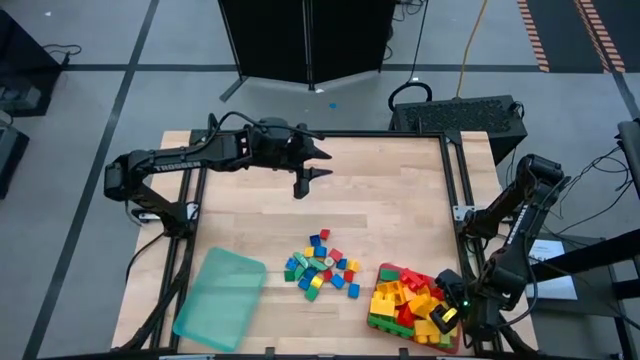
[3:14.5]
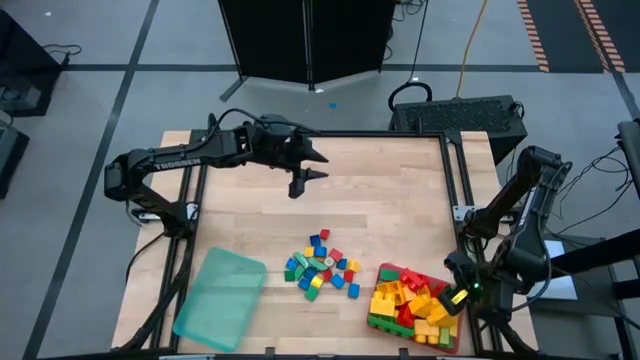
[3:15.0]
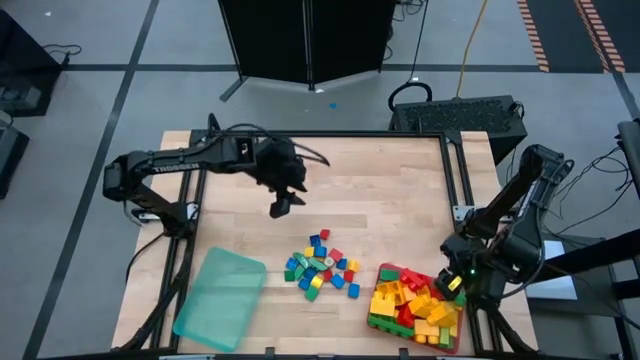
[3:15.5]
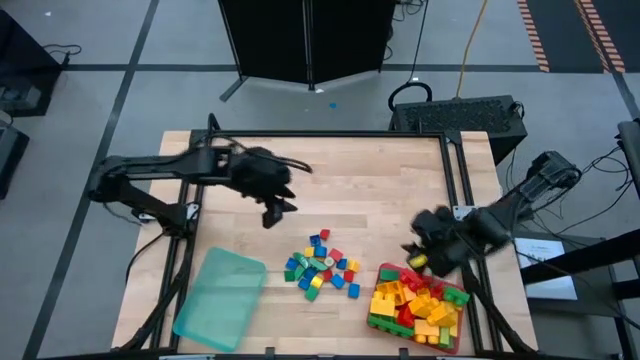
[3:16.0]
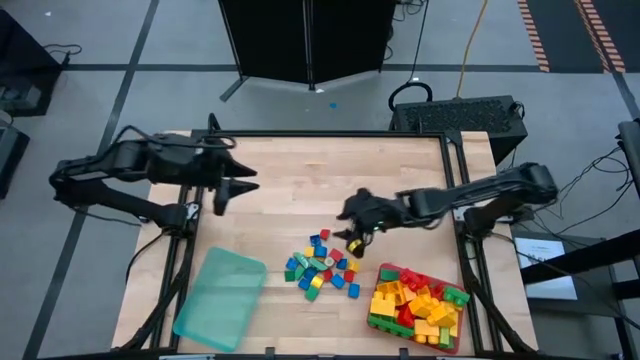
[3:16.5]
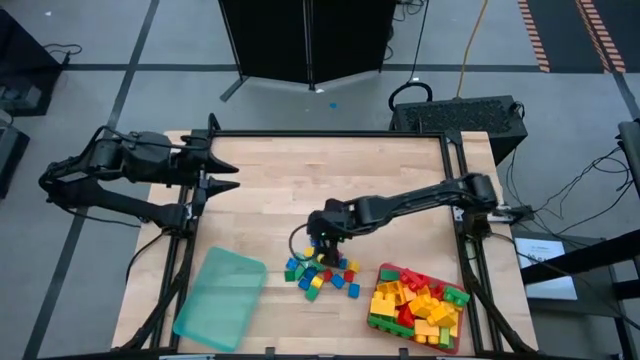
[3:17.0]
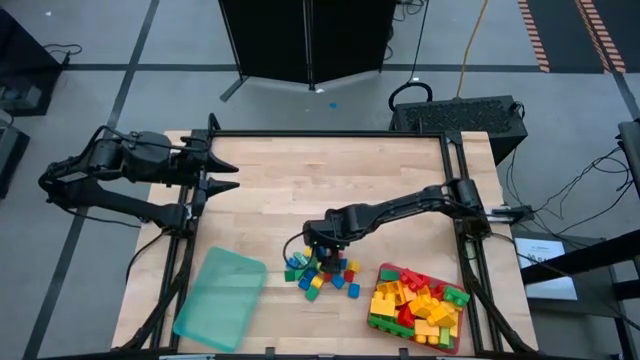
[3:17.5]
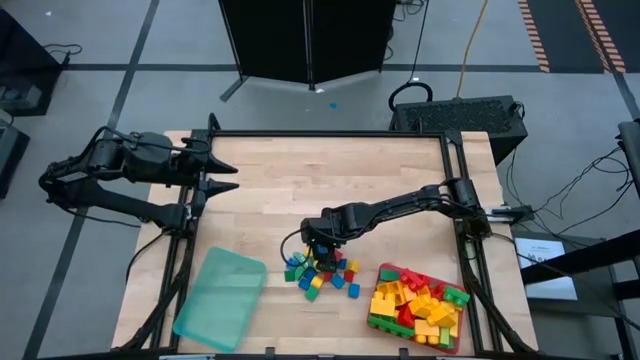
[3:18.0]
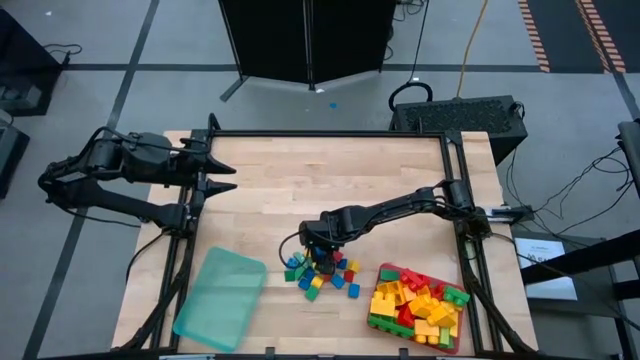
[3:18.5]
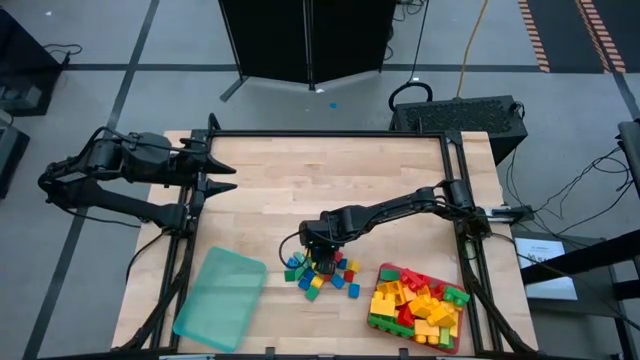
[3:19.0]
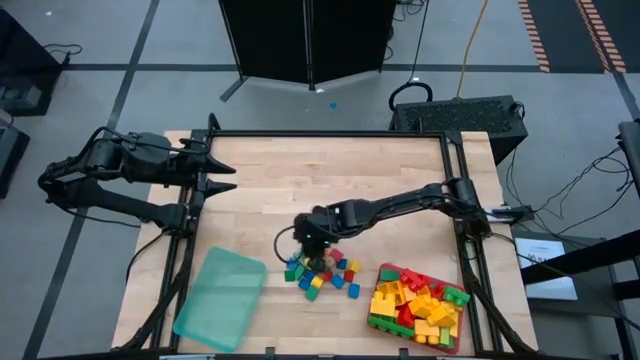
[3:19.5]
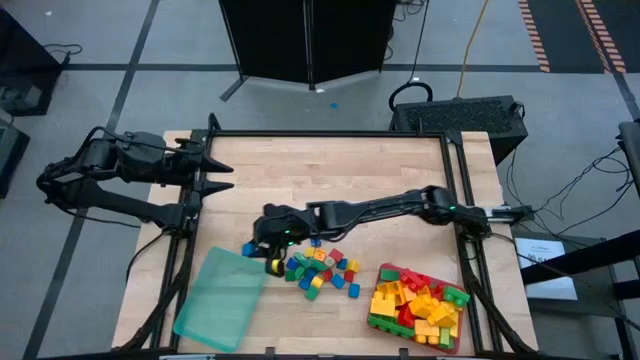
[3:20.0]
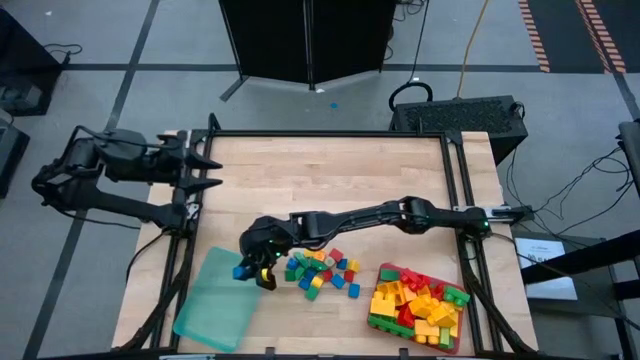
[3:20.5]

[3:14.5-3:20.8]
Task: Sort blocks by size
Put the blue block into the blue bin

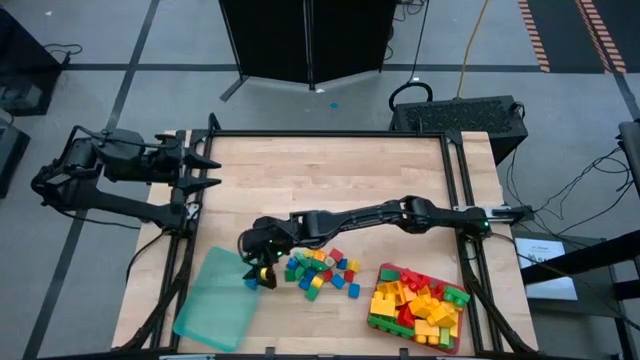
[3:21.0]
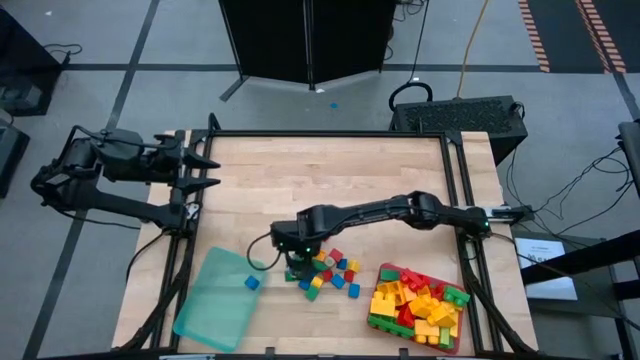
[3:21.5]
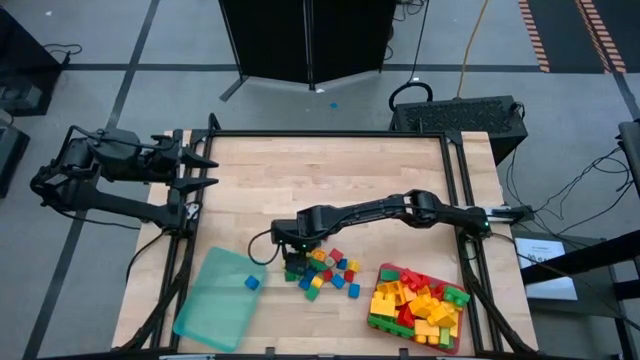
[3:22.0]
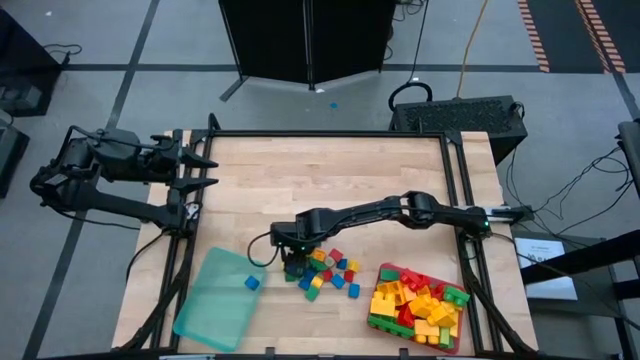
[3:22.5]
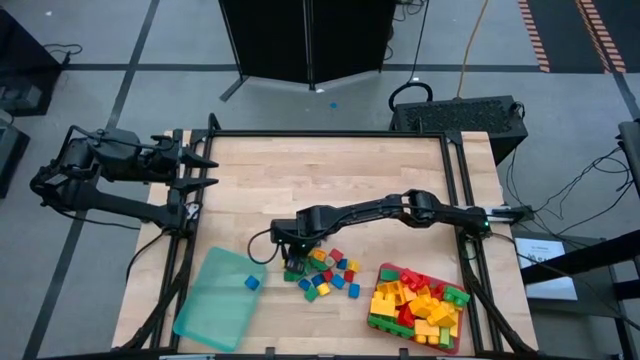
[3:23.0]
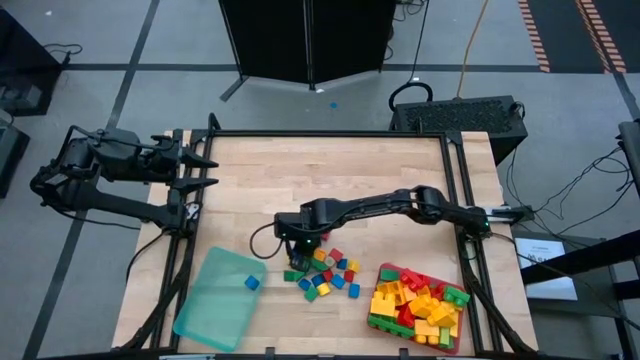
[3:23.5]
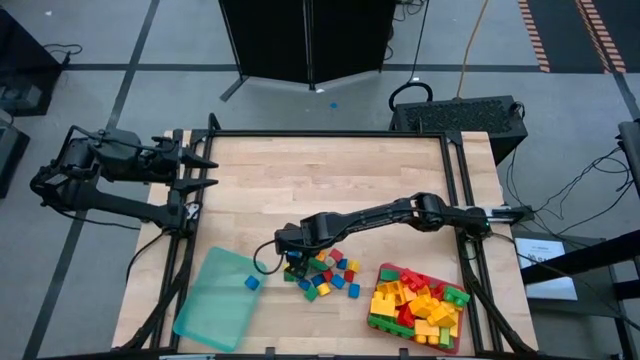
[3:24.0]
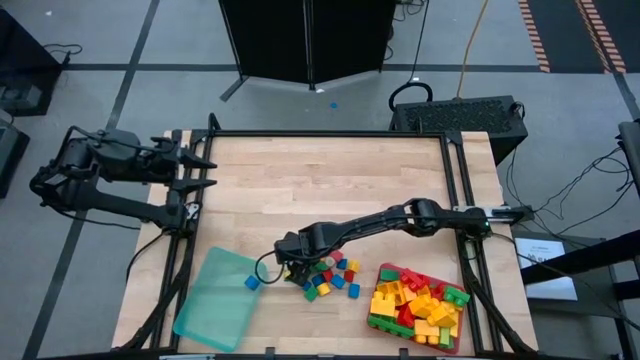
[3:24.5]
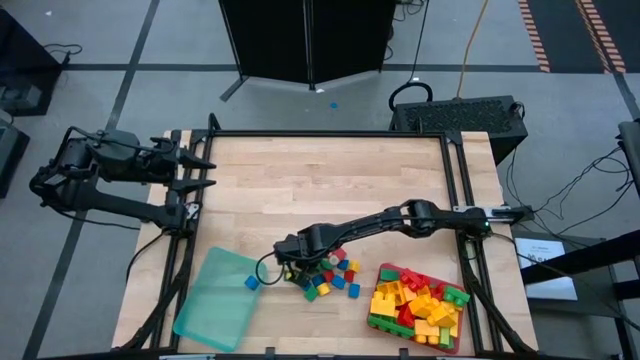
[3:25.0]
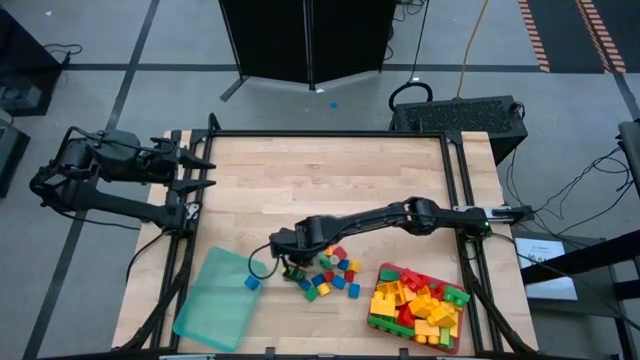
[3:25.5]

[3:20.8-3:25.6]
Put the 2-stud green game piece into the blue bin

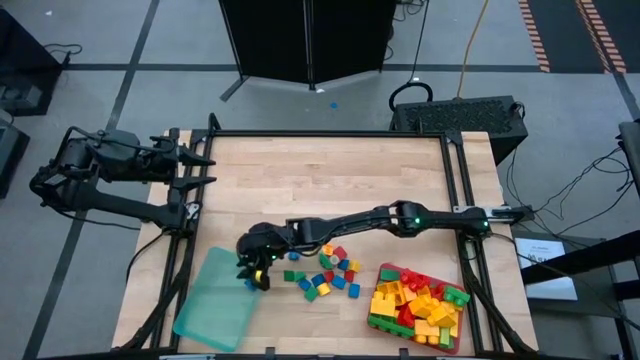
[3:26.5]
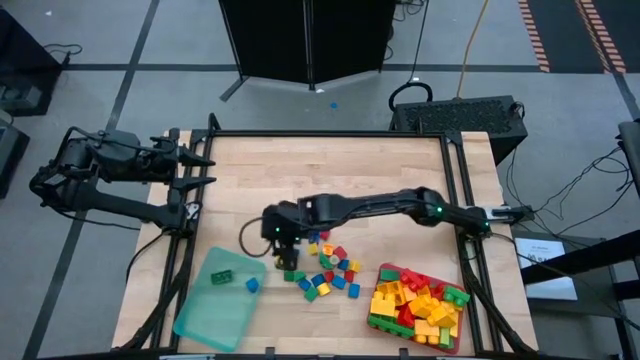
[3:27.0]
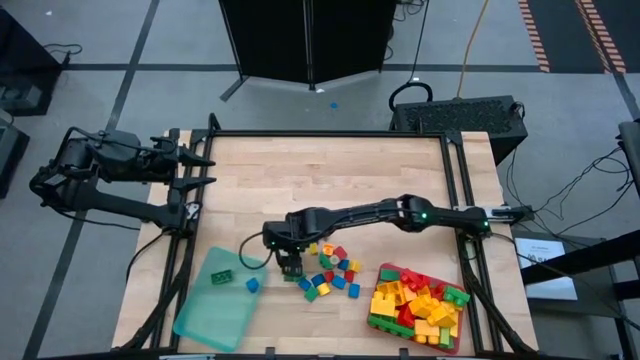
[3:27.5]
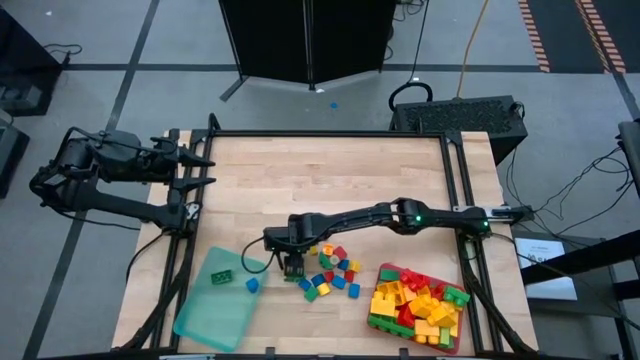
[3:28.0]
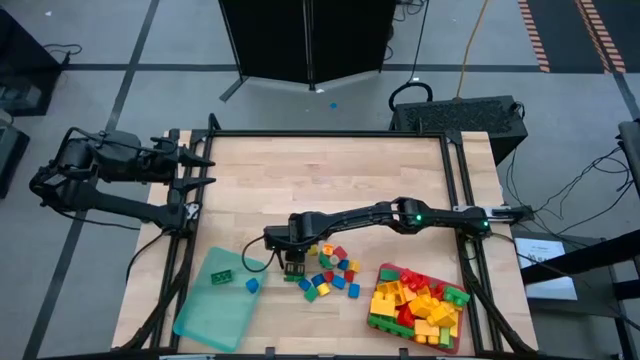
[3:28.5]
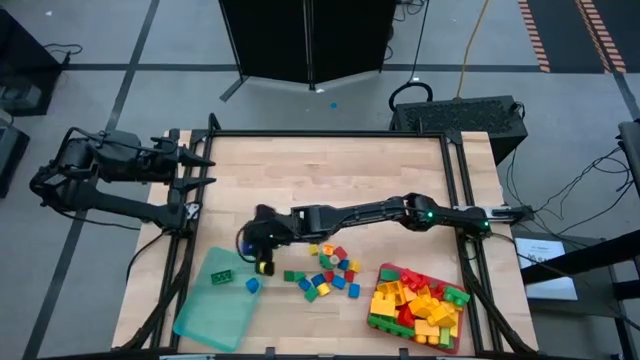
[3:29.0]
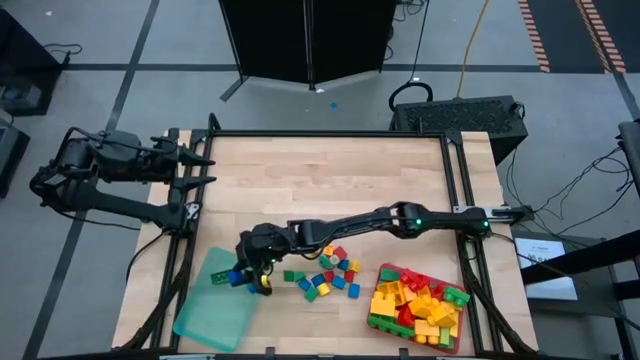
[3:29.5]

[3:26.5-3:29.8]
Put the 4-stud blue game piece into the blue bin

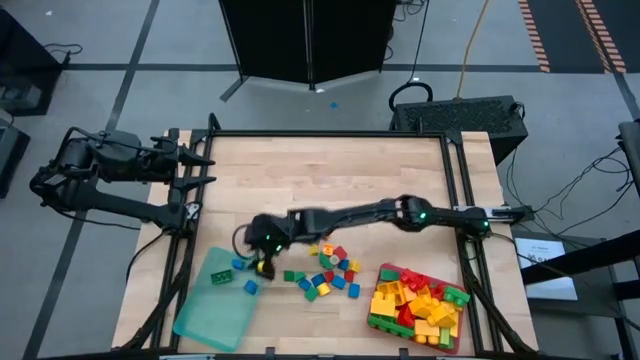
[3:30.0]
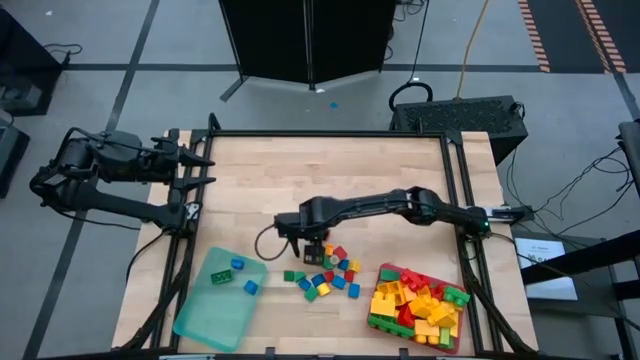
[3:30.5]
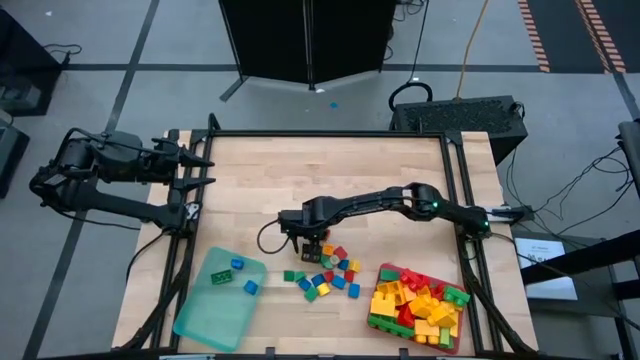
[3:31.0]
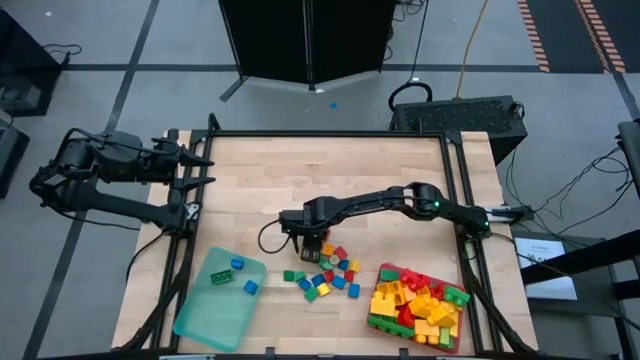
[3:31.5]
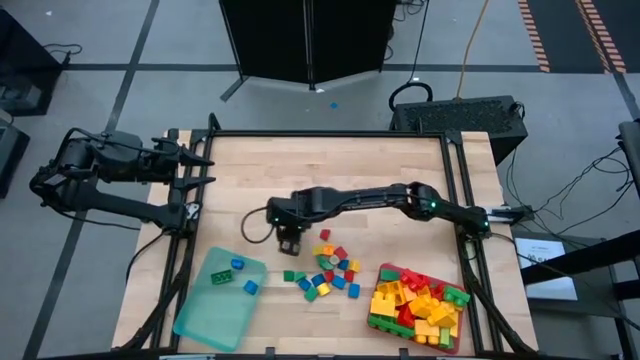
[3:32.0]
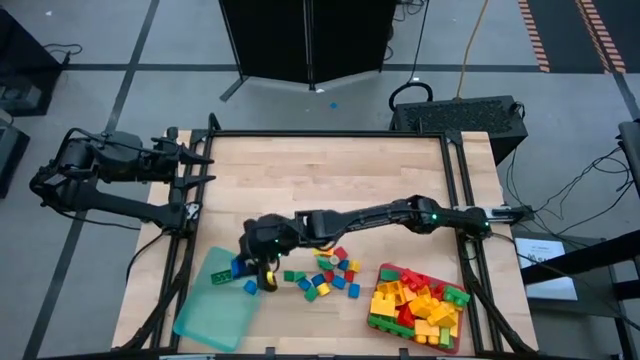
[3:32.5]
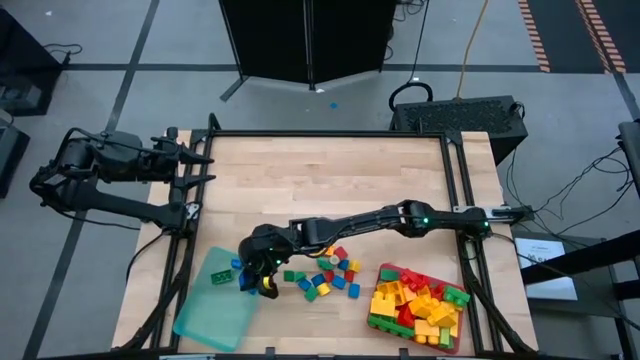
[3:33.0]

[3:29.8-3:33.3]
Put the 1-stud blue game piece into the blue bin

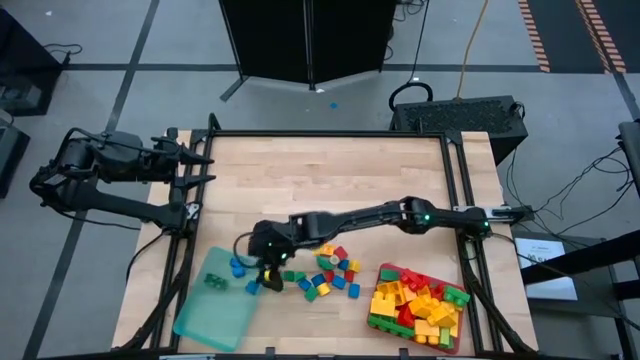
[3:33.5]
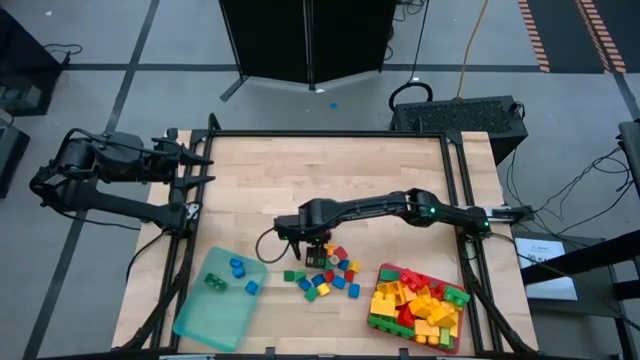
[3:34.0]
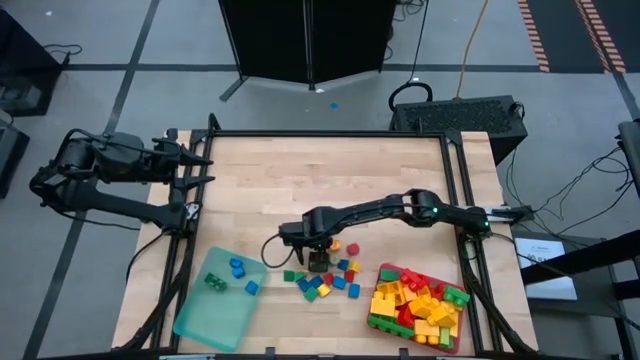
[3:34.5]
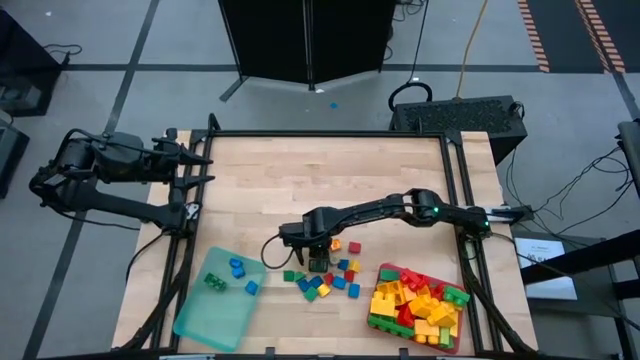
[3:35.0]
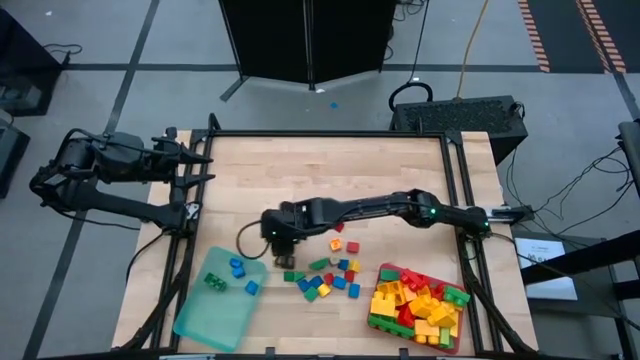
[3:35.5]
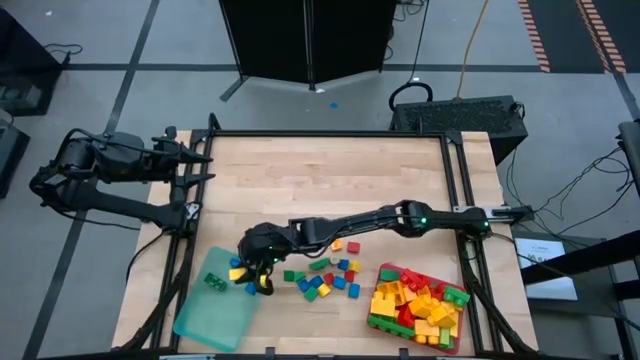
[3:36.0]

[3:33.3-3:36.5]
Put the yellow block into the blue bin
